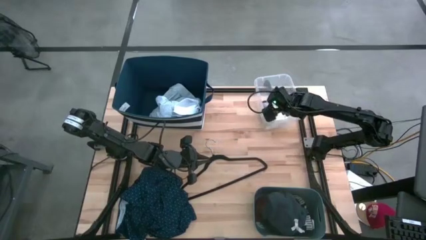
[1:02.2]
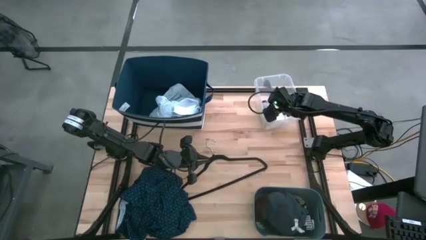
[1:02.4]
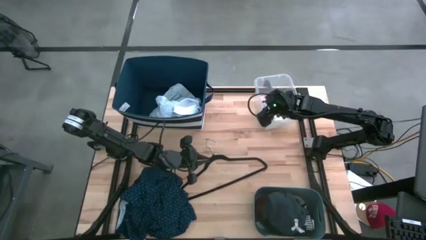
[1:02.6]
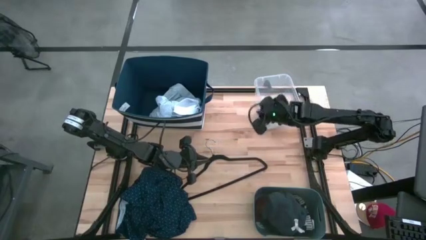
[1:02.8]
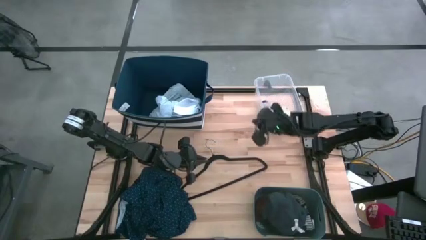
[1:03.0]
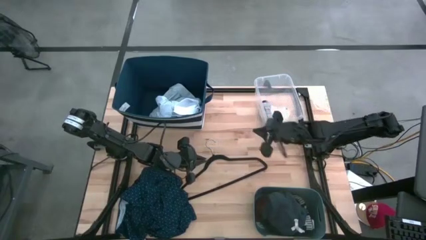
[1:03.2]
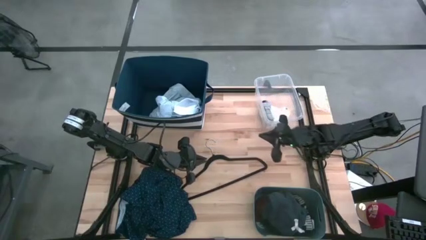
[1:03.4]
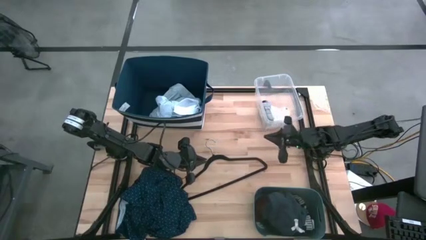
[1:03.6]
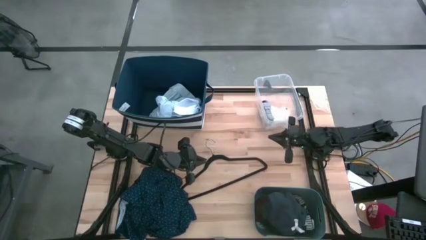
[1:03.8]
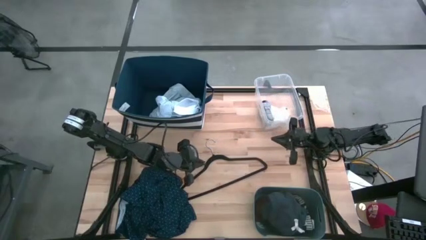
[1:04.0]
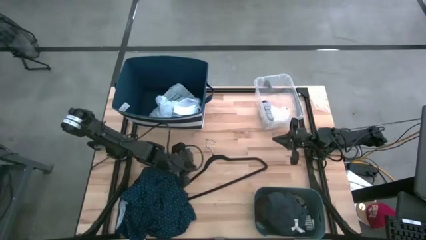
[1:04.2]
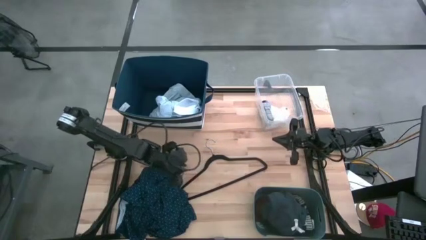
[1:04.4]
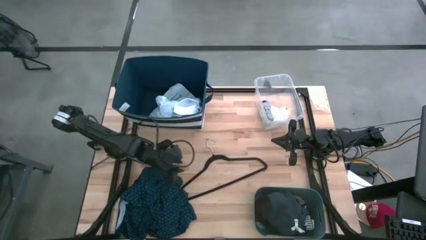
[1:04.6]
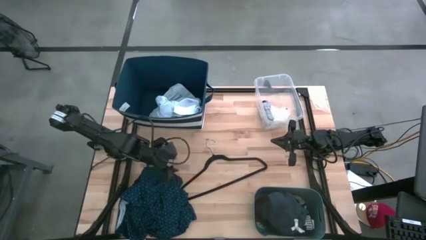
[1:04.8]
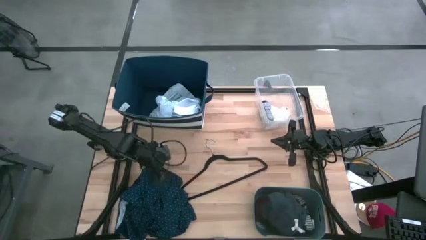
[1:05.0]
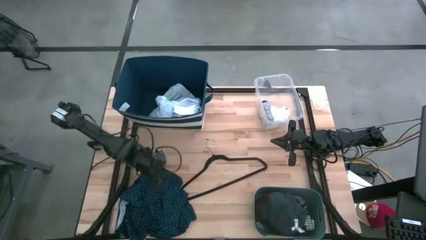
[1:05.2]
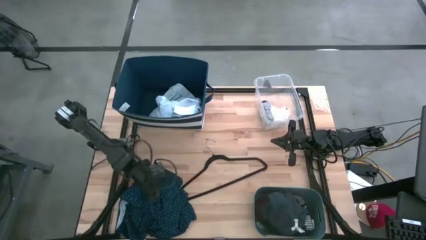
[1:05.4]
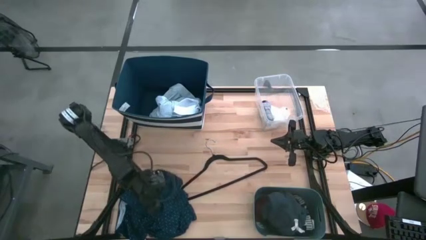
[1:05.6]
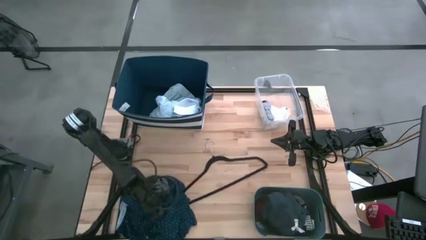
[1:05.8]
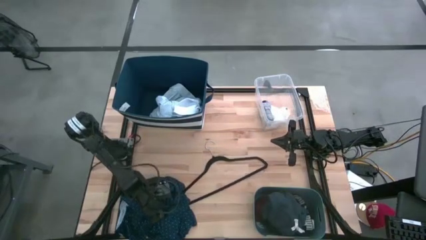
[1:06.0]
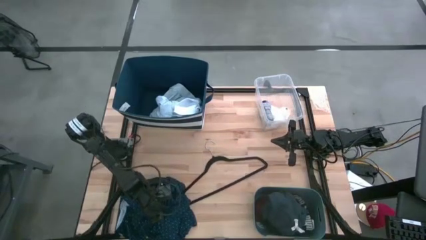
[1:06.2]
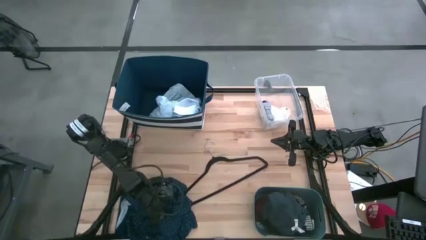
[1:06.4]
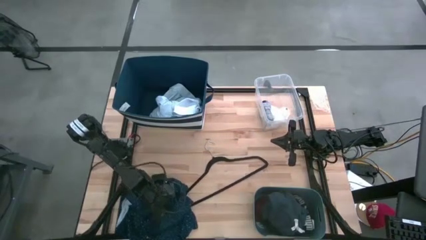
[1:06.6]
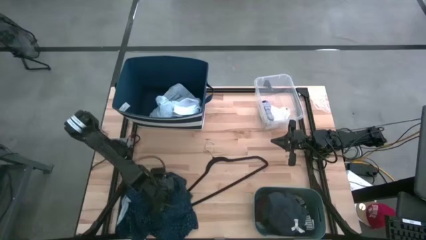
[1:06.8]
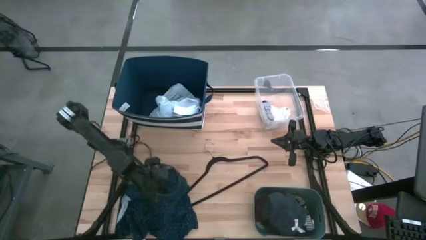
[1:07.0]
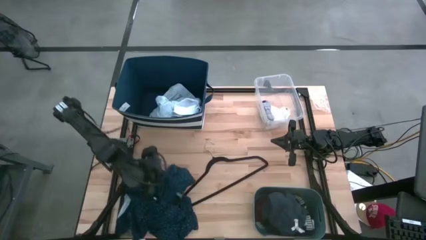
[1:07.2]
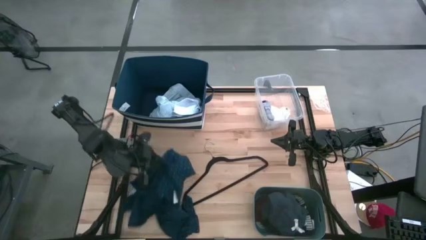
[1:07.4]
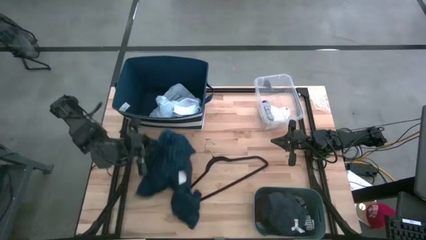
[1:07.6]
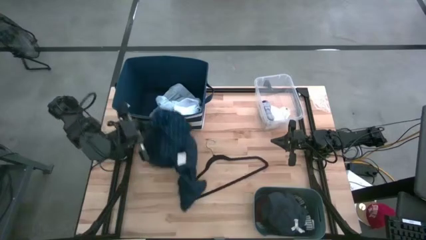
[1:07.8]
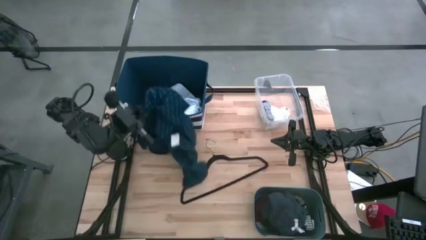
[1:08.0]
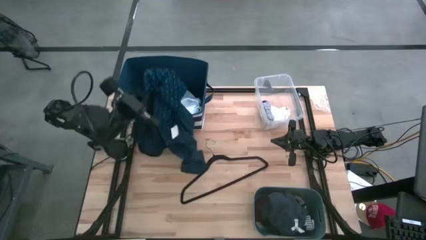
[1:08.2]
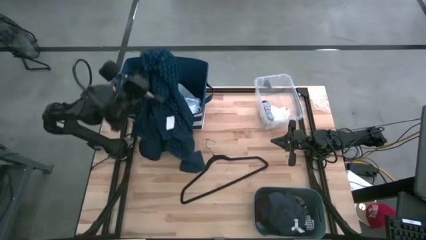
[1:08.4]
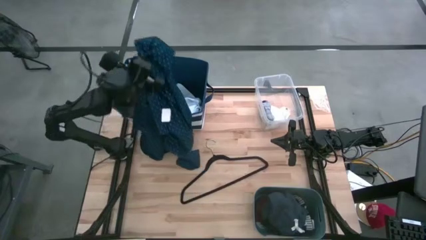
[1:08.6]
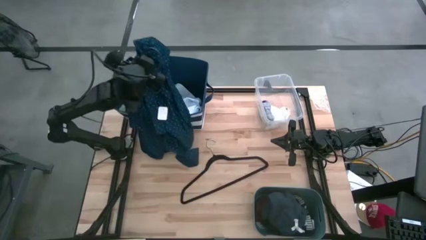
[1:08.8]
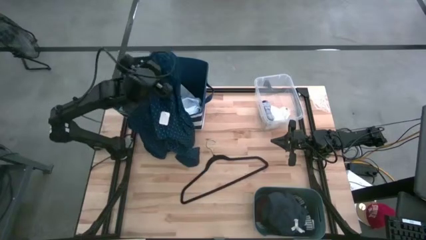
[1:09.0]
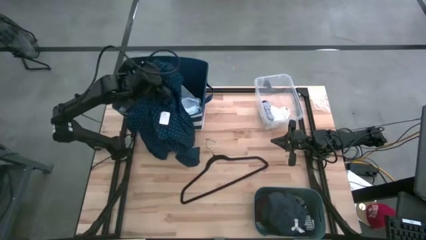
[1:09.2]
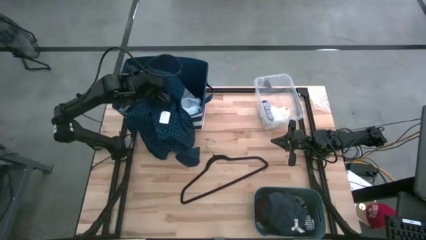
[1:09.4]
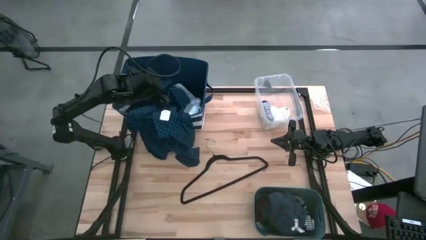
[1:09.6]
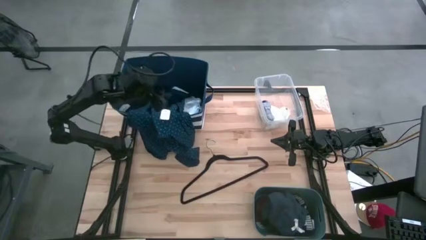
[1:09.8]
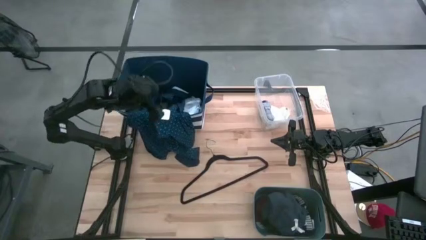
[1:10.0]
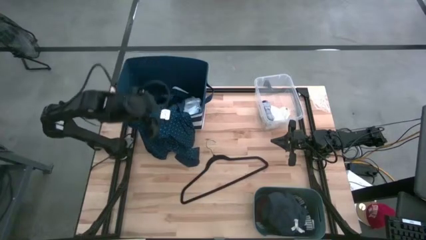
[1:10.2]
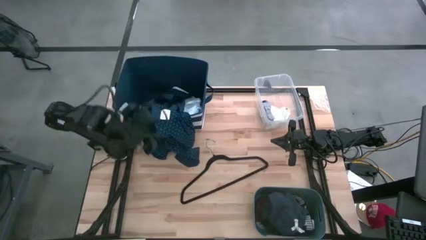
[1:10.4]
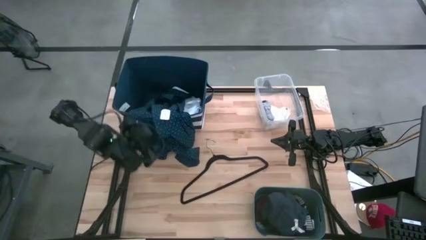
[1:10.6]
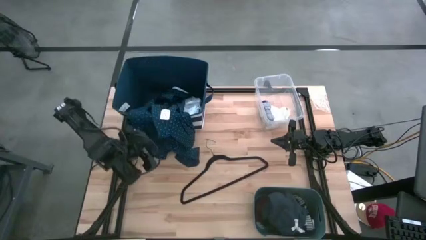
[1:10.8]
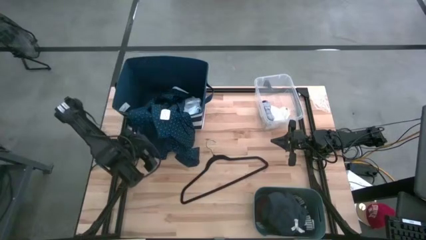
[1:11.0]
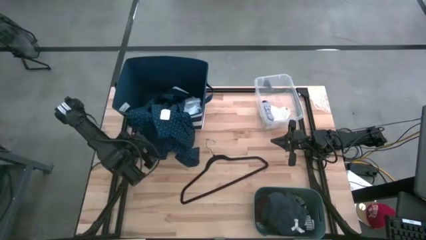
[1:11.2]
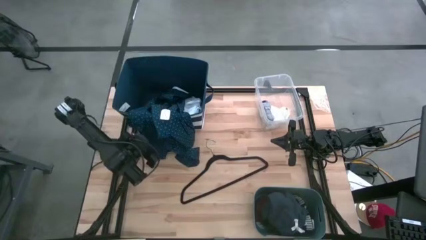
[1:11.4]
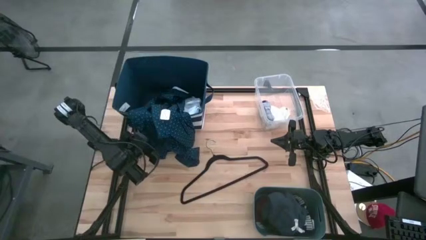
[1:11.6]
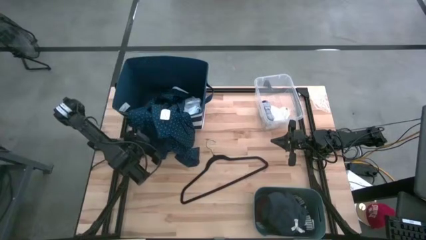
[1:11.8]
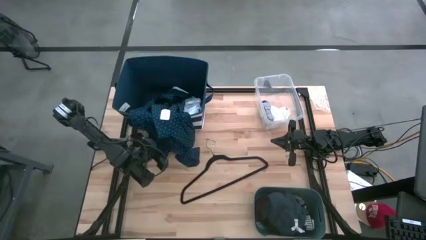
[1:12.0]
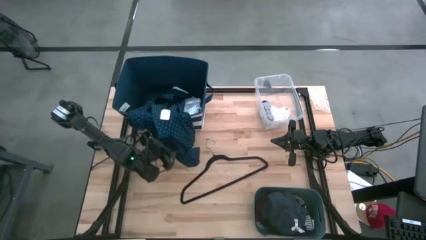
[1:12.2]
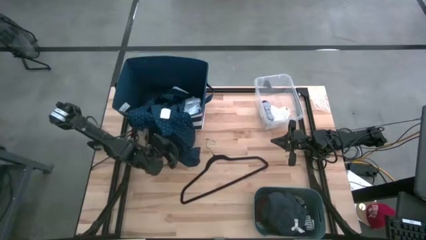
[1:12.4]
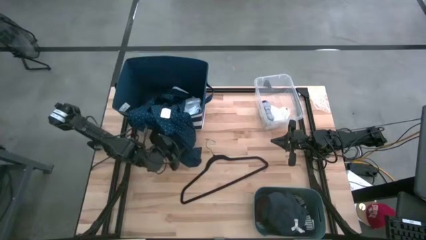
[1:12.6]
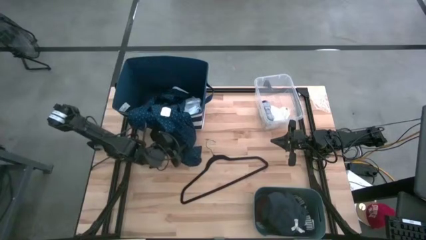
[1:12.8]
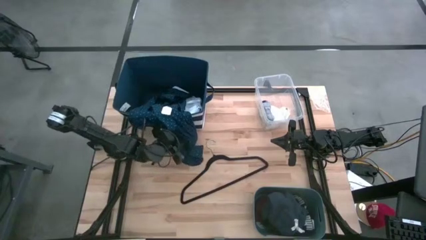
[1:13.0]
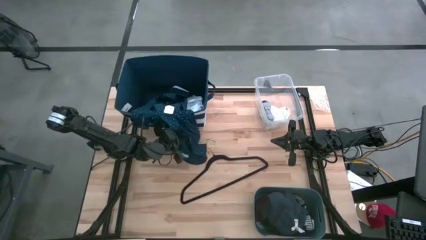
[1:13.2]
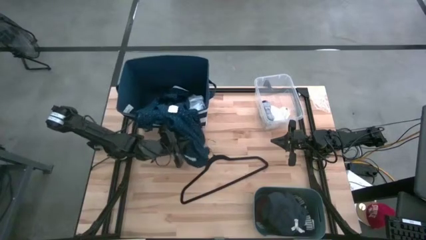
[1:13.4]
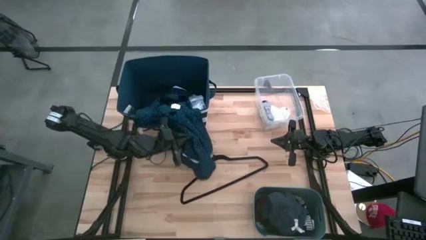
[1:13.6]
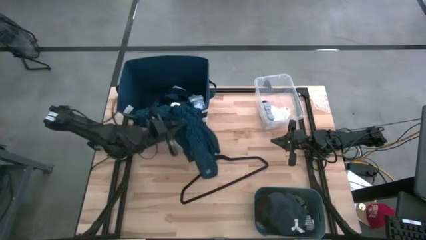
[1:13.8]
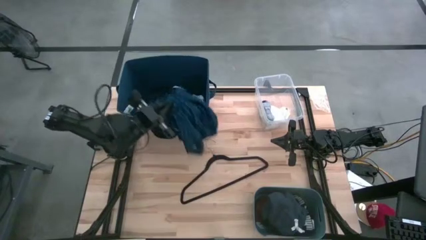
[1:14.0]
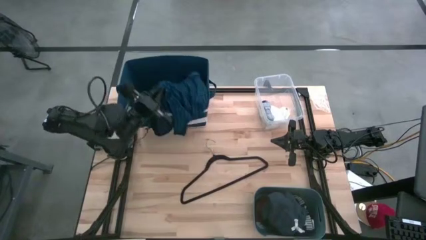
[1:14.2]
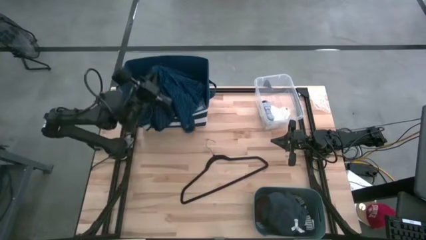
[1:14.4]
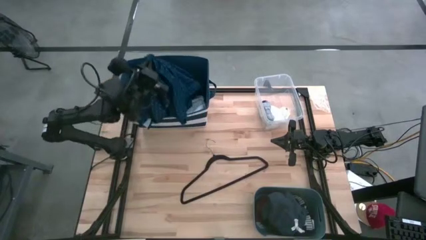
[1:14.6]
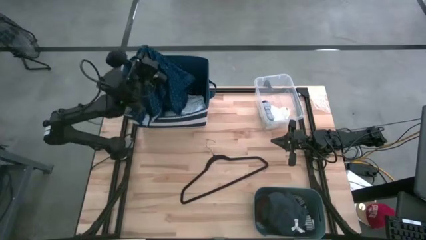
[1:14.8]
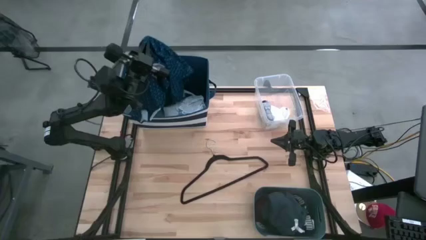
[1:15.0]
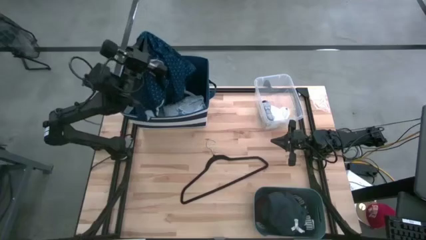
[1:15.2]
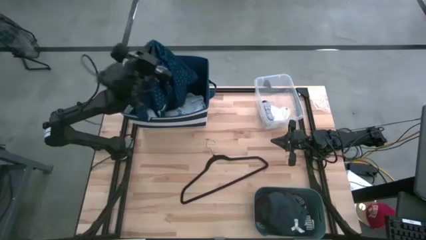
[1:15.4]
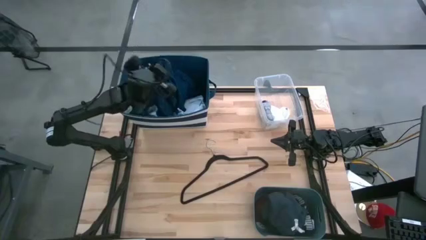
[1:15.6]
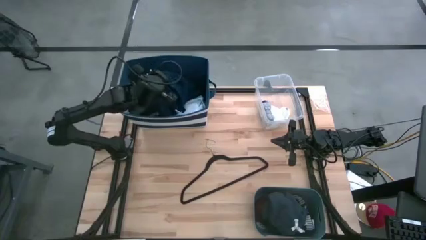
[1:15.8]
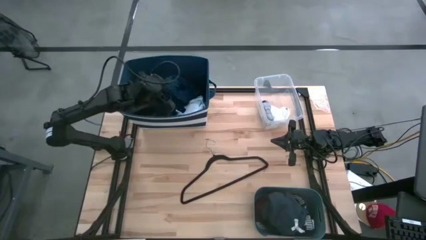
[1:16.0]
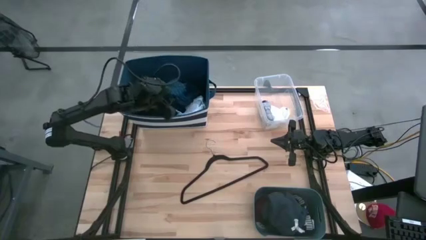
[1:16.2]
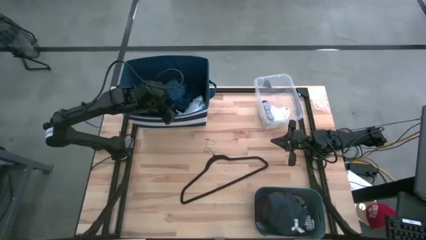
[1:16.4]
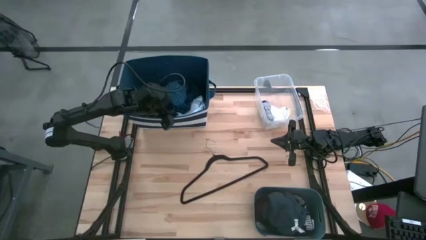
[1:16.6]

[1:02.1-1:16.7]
Task: Pick & Place Cloths
Put the blue patterned polo shirt into the laundry bin
